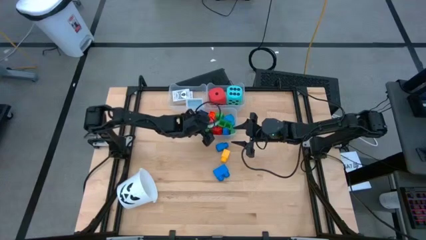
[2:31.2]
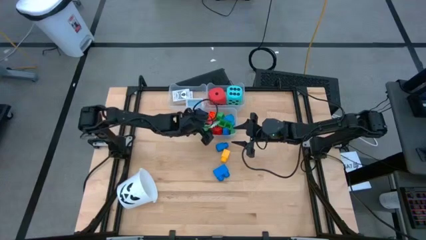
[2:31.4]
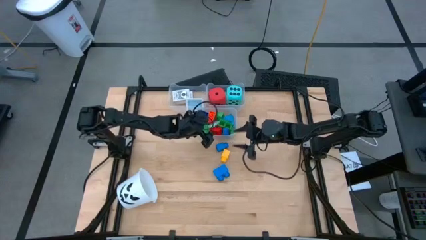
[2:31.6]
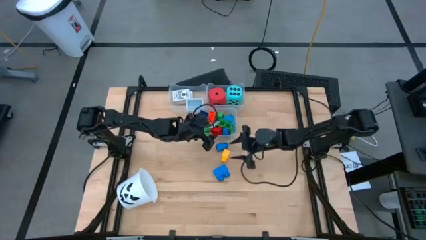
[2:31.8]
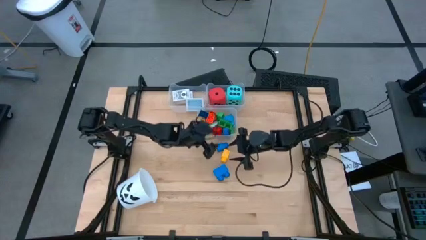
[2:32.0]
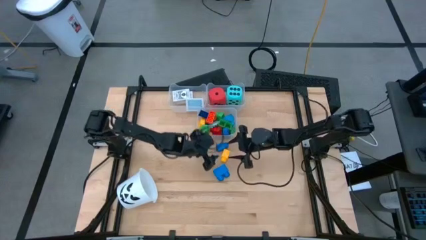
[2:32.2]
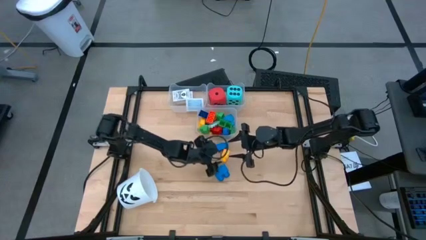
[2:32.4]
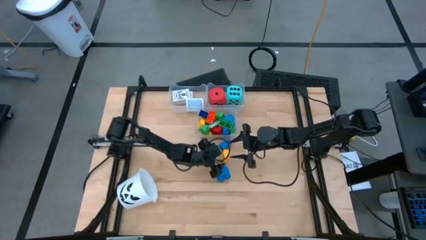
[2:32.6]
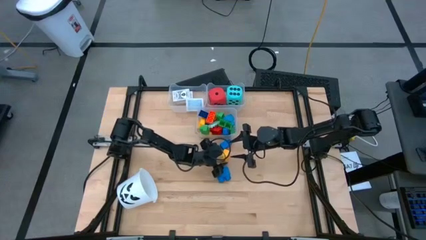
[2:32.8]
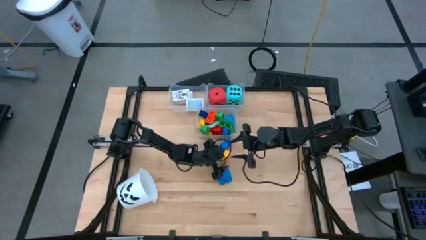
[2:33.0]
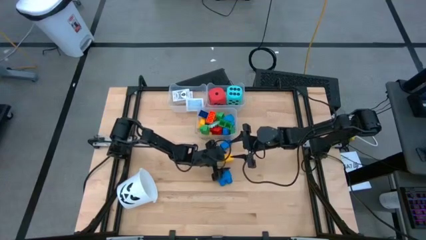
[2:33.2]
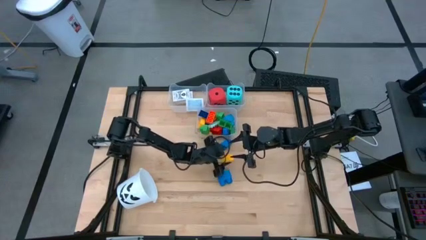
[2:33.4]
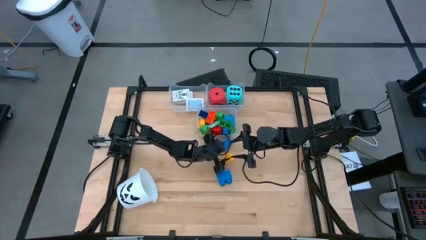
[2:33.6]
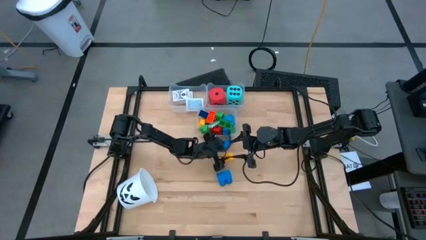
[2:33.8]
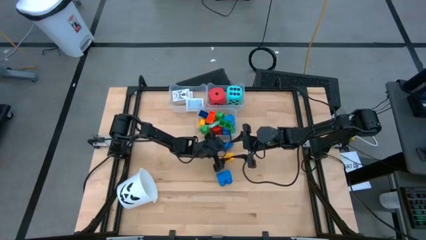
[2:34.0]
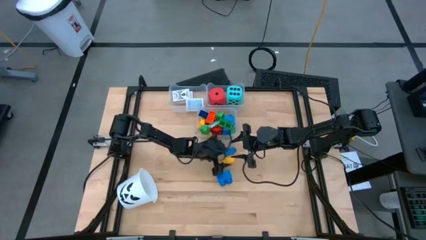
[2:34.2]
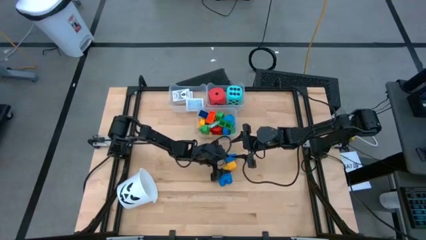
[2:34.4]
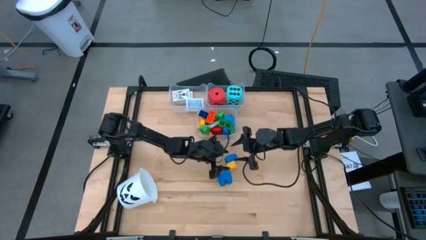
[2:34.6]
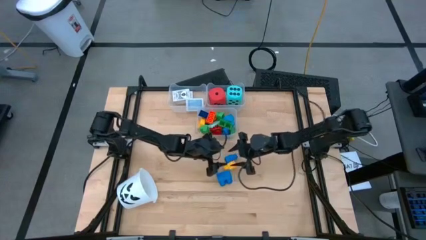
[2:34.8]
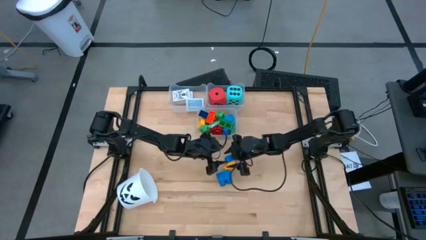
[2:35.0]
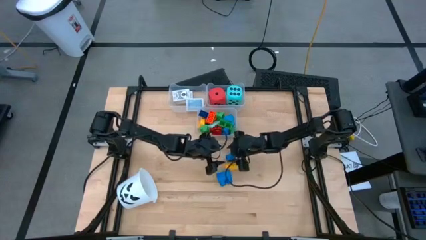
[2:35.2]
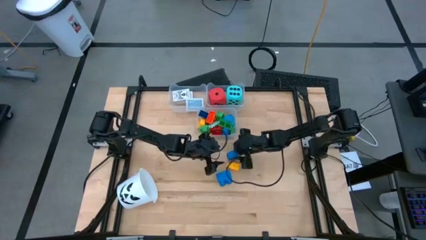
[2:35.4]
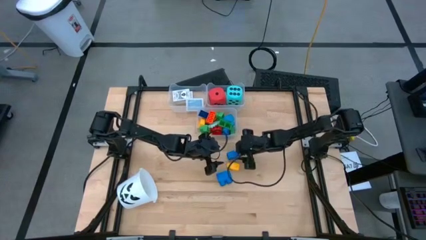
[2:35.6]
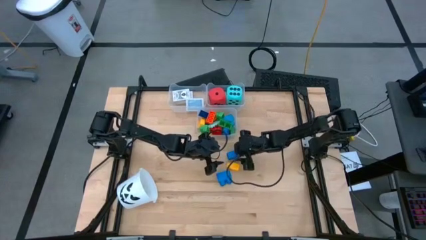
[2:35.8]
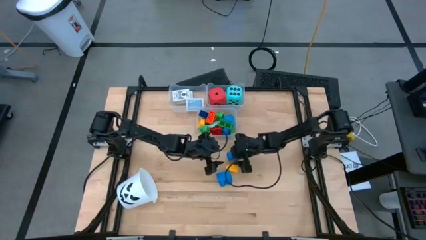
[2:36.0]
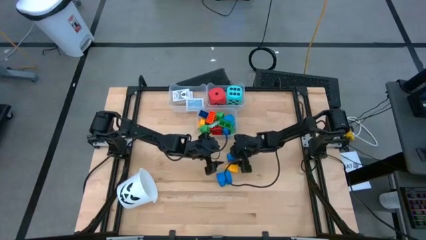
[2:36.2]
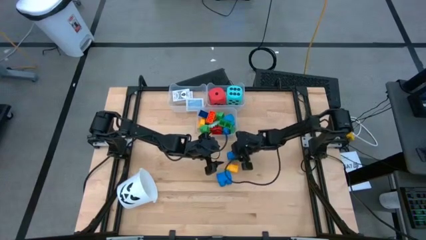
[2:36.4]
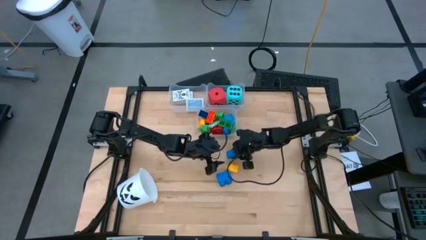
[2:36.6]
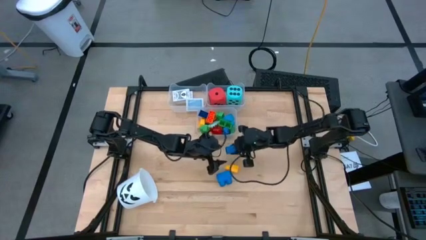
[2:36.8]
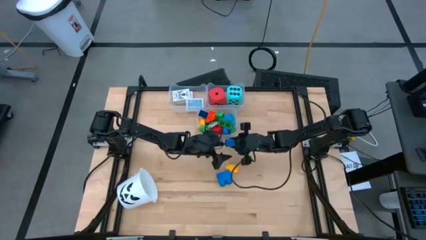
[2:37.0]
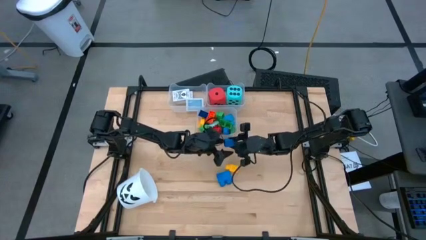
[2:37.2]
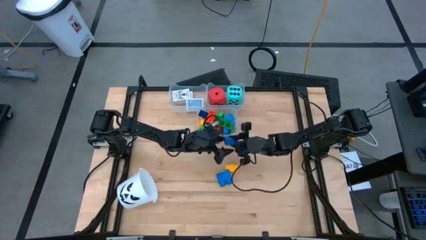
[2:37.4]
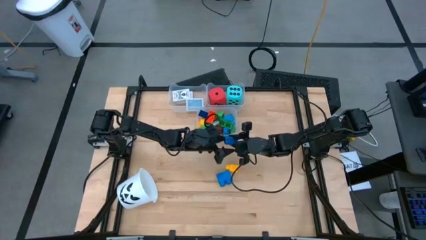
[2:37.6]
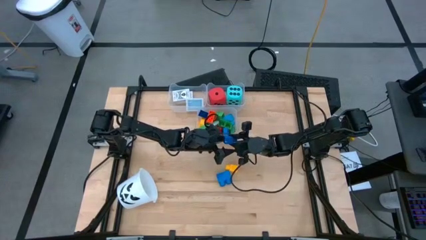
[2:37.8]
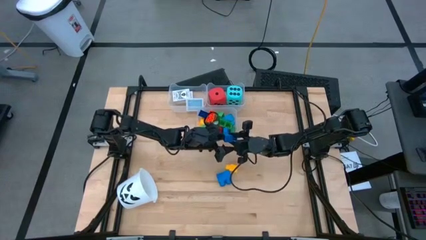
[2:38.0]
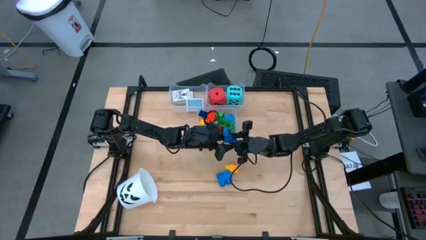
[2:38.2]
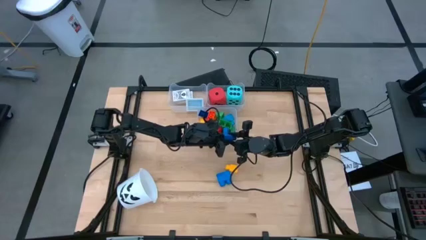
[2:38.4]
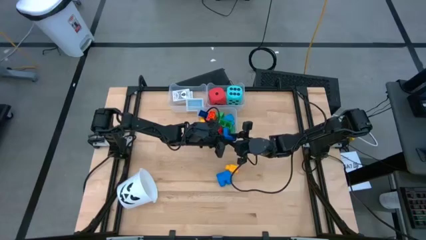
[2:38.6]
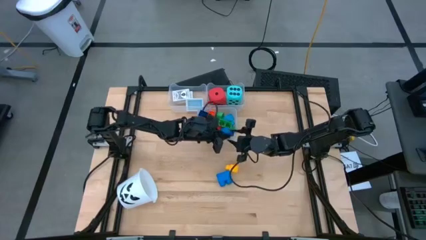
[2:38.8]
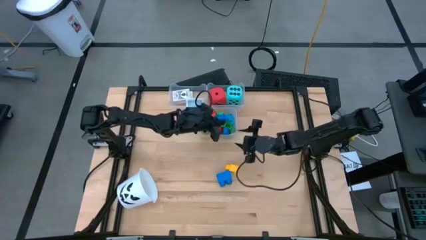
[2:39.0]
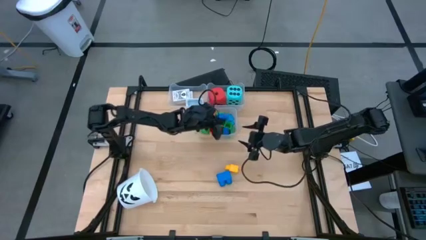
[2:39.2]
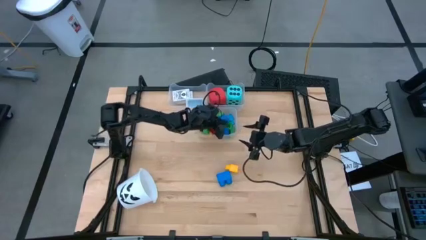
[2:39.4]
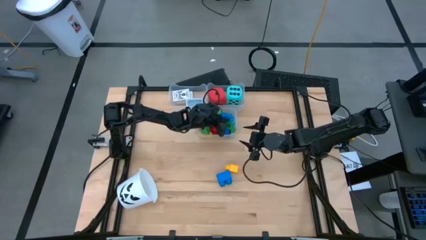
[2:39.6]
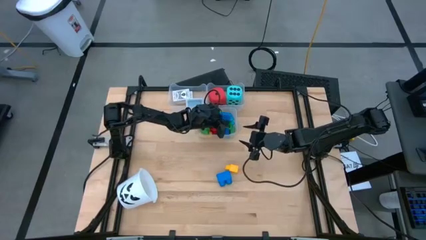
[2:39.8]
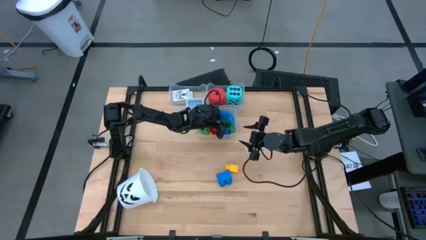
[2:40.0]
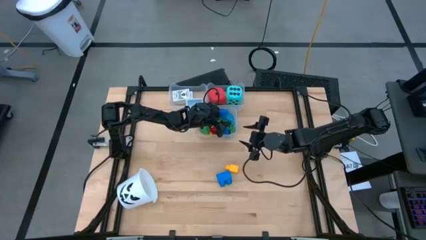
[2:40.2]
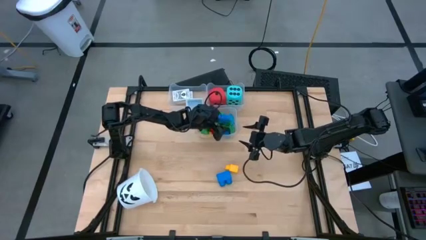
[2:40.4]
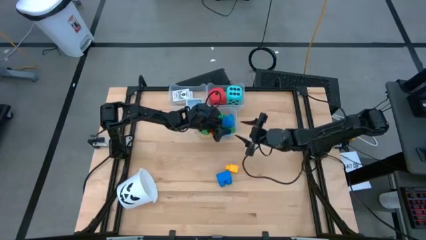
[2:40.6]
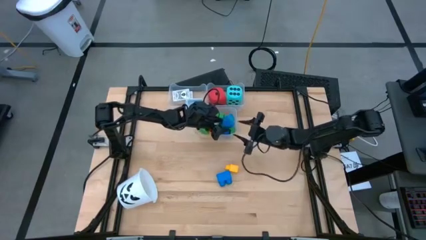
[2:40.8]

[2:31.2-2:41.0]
Task: Pick & Place Toys
Put the top blue game piece into the bottom transparent bin

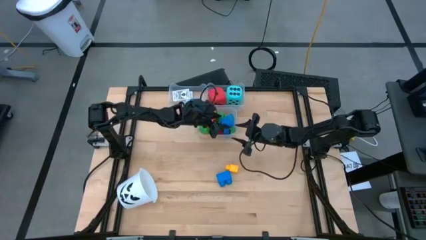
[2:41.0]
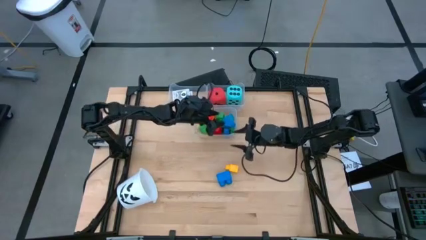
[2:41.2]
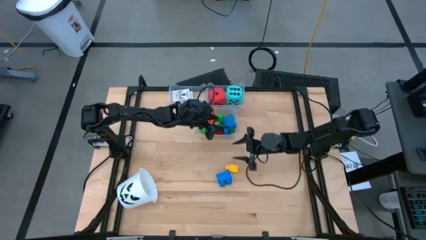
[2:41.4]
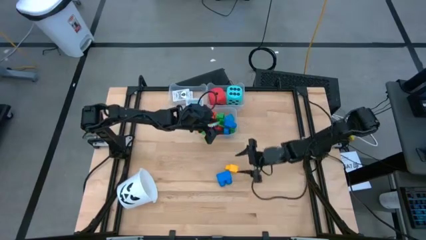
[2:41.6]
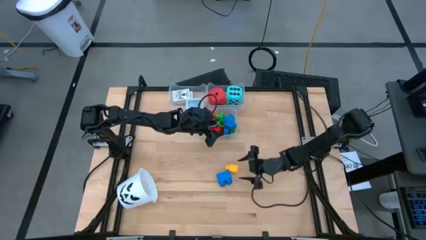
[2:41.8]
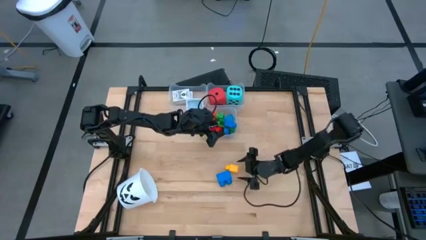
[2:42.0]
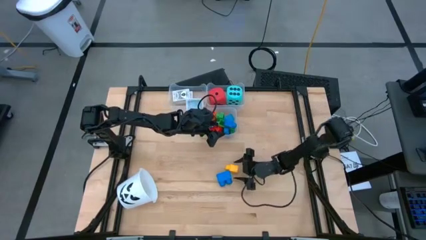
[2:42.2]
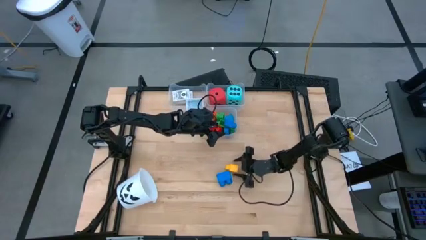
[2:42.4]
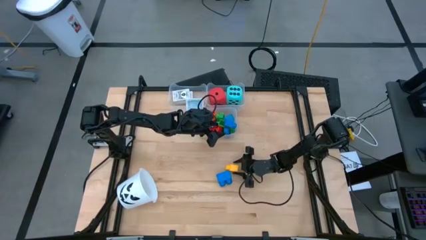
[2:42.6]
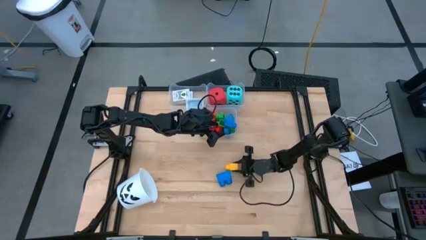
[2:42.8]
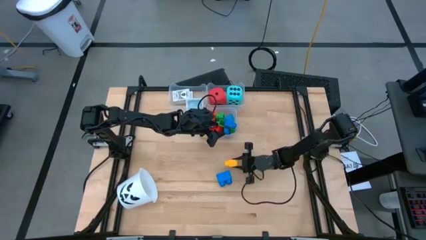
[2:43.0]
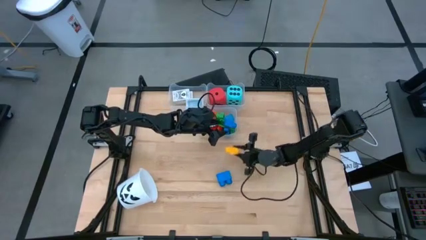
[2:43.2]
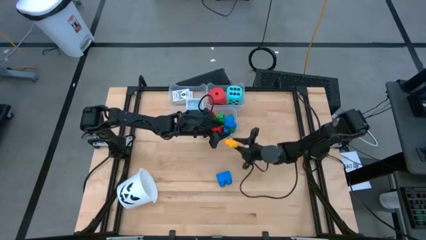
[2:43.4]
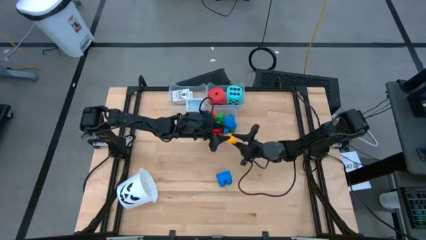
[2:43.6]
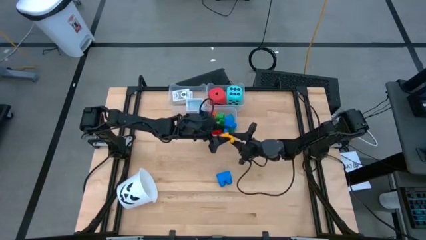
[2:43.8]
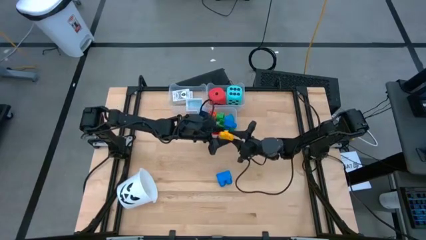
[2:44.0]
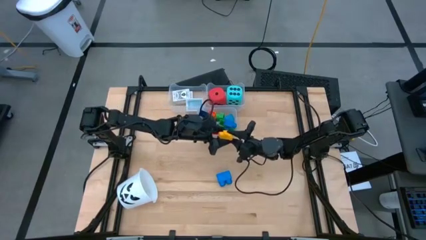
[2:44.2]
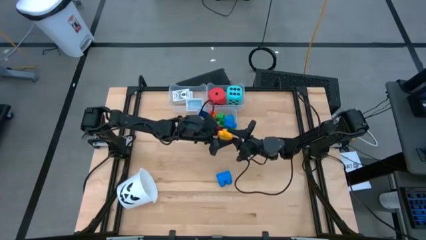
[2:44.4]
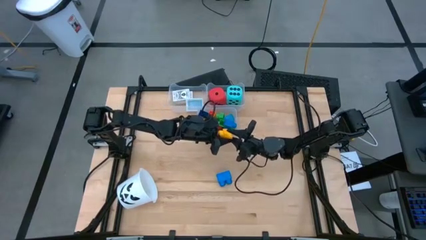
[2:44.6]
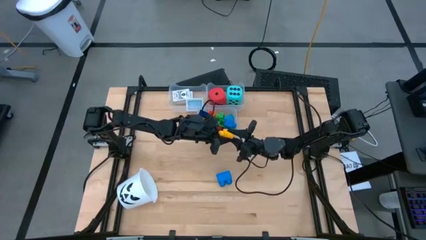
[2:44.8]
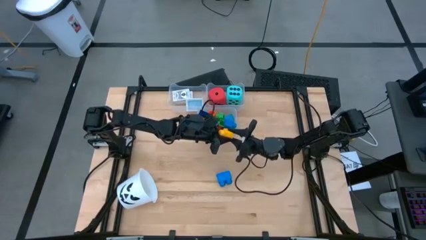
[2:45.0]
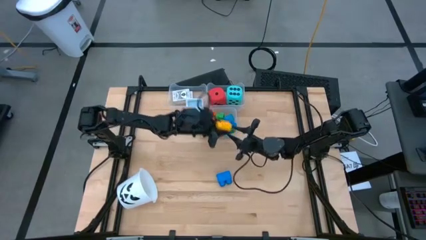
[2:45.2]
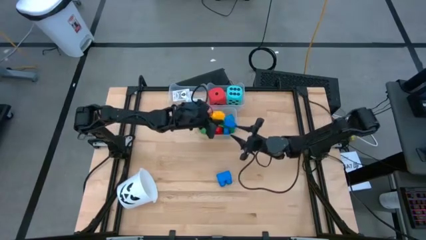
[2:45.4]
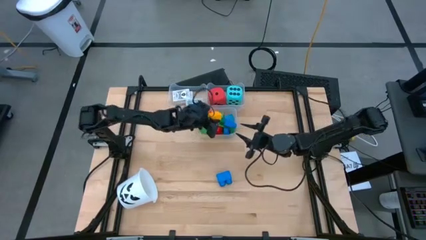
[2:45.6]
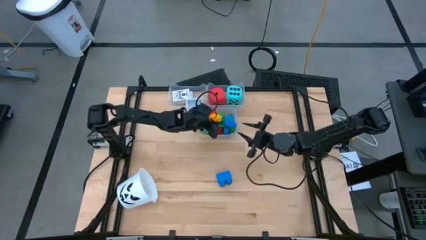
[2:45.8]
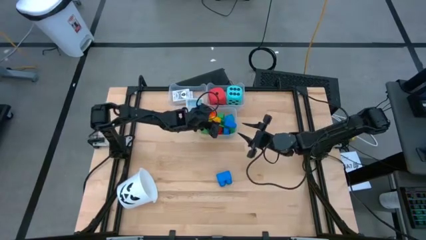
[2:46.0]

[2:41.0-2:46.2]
Put the yellow game piece into the bottom transparent bin
